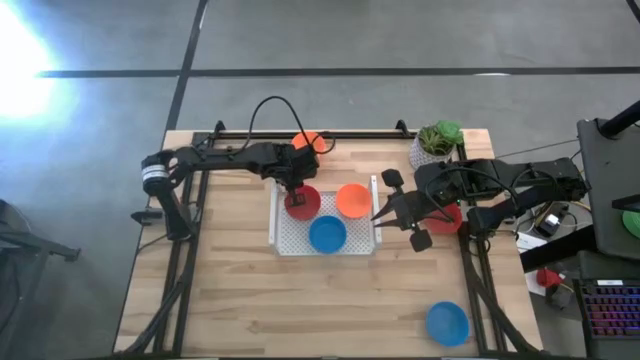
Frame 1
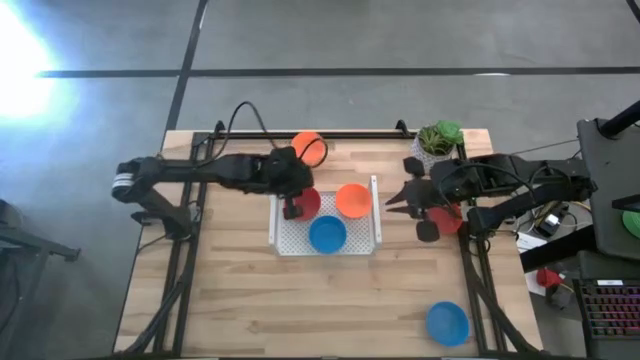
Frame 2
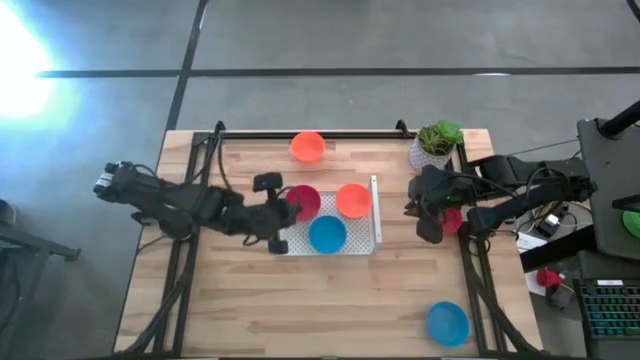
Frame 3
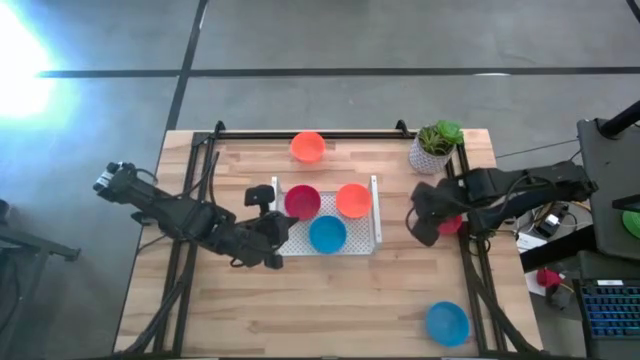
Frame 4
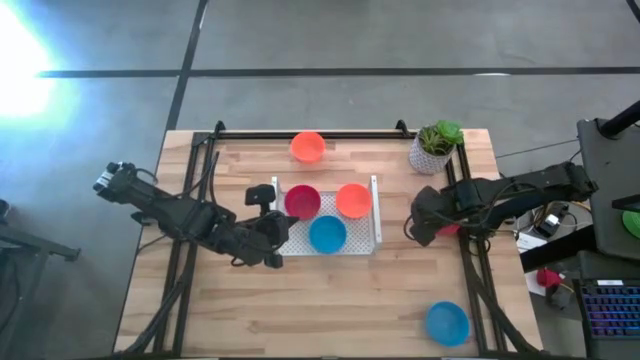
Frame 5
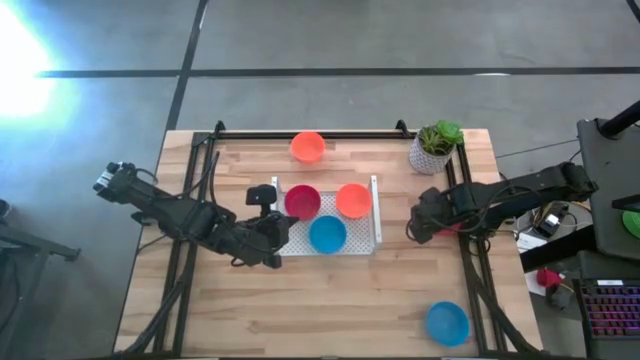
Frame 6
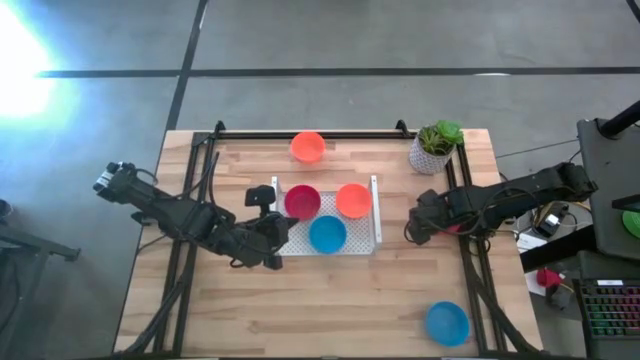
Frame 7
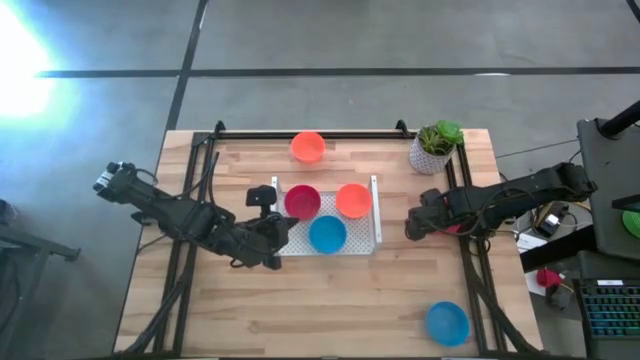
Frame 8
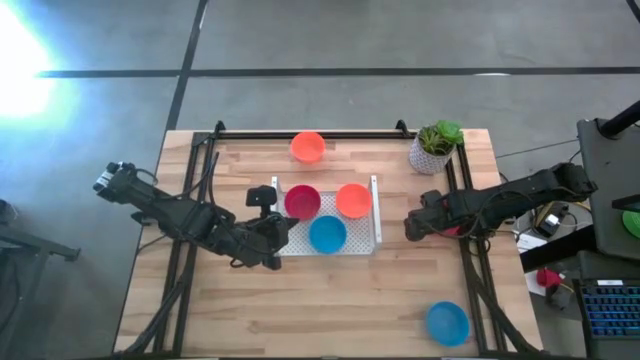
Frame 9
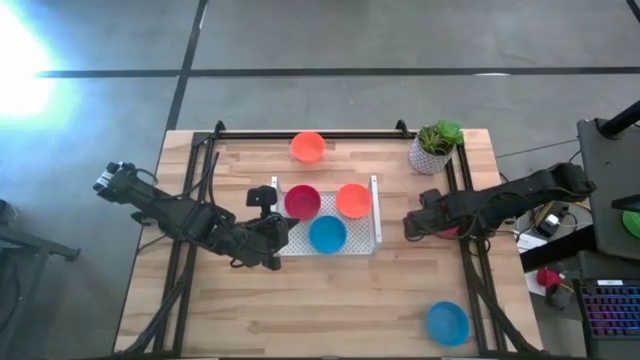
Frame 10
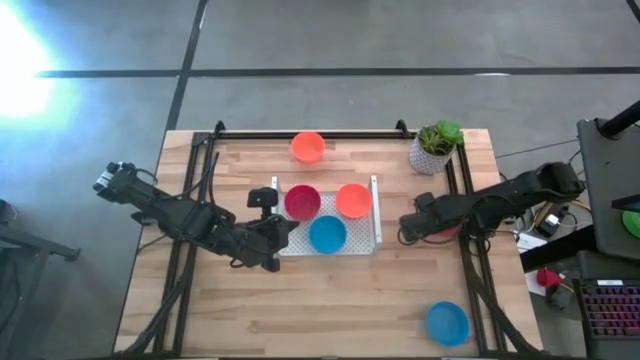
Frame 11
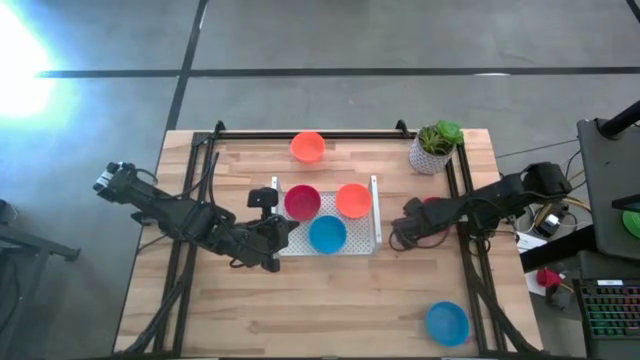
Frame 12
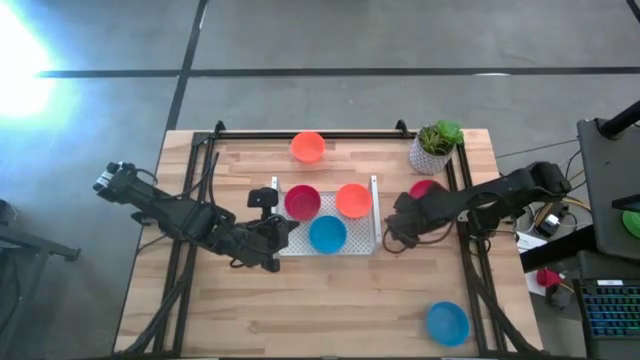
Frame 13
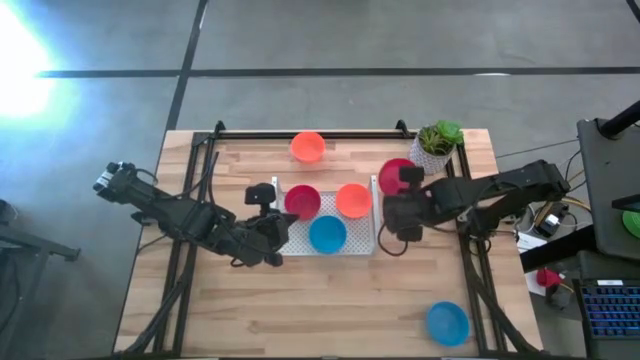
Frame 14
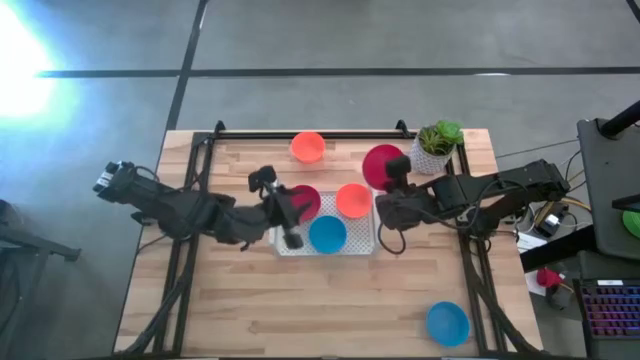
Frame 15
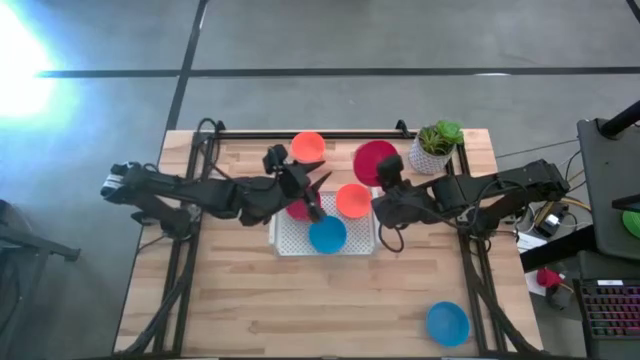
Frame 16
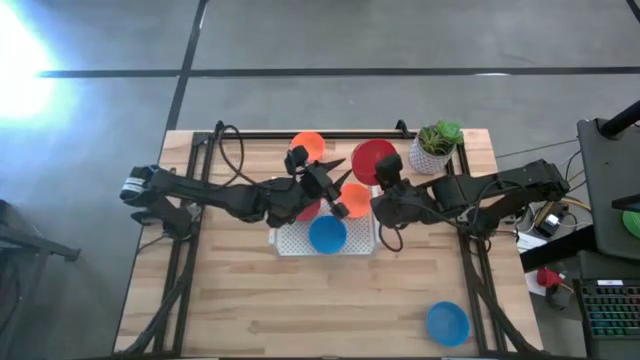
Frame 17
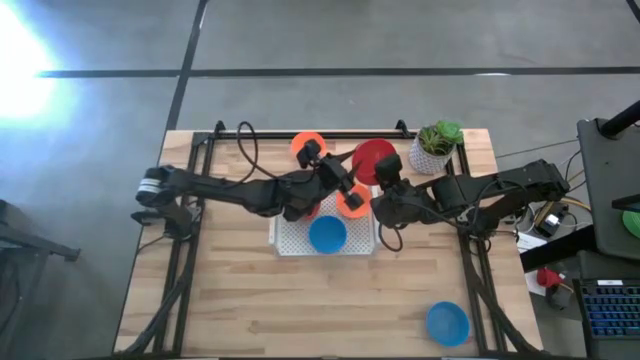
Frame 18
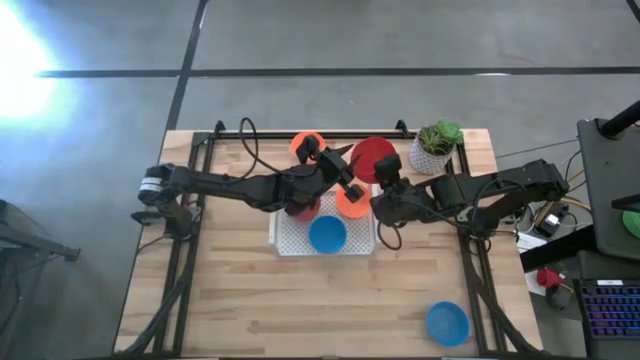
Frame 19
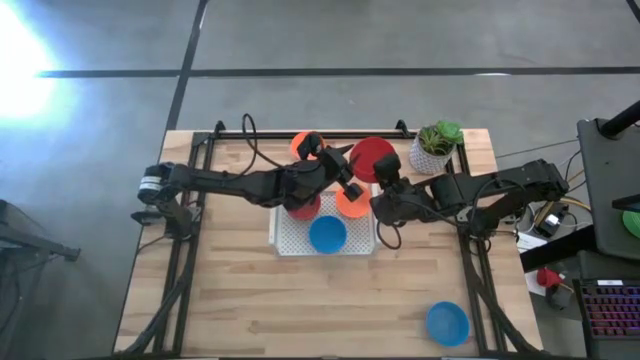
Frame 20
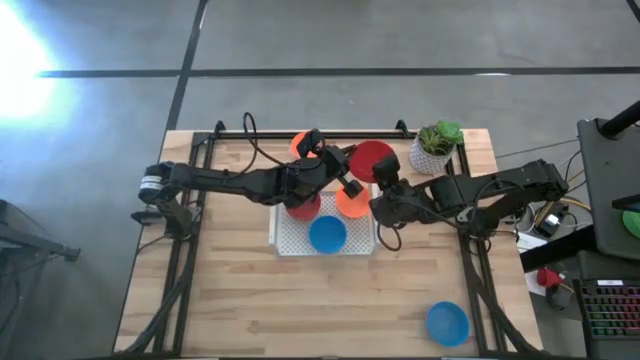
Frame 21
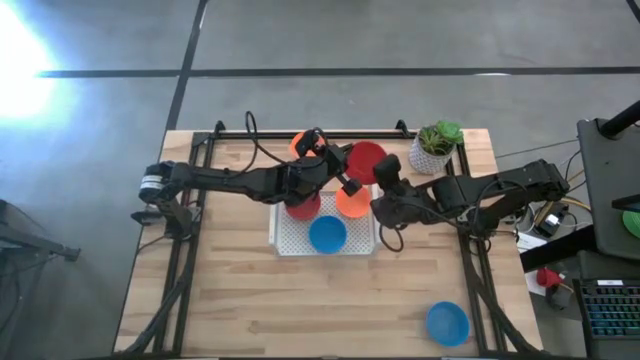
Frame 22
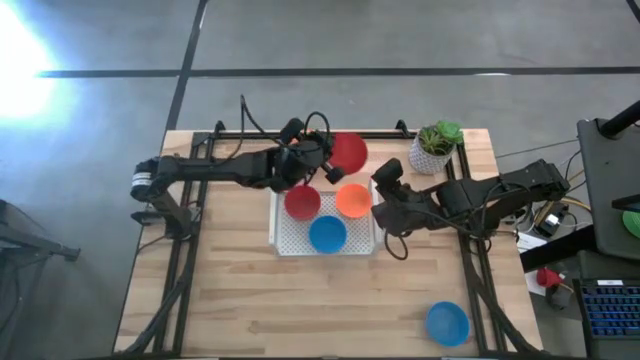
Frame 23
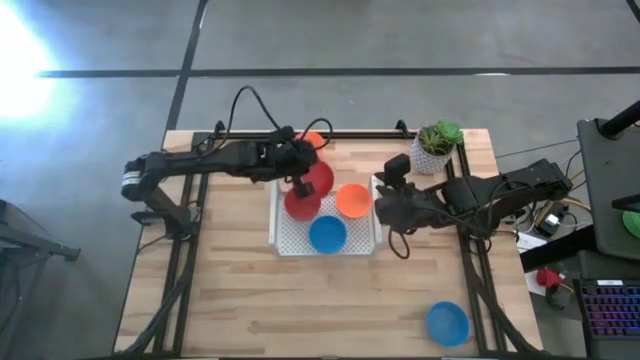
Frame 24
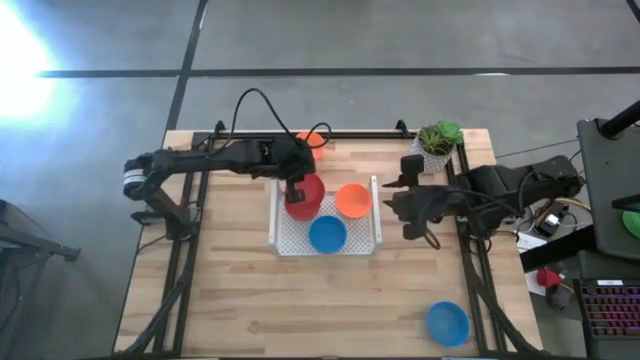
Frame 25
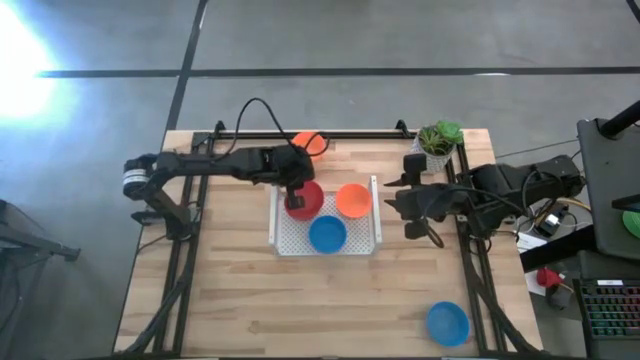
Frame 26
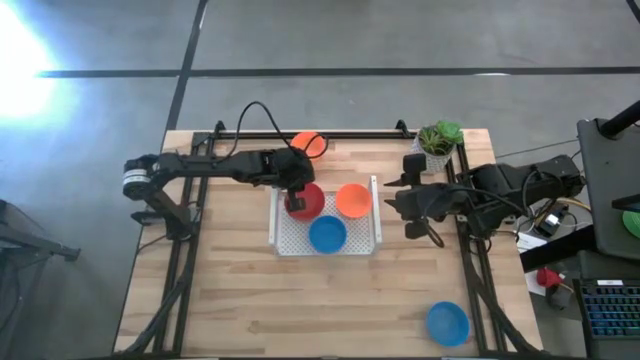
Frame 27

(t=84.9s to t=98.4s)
Task: Pick & Place Mini bowls
Stack the red bowl on top of the red bowls on the shelf

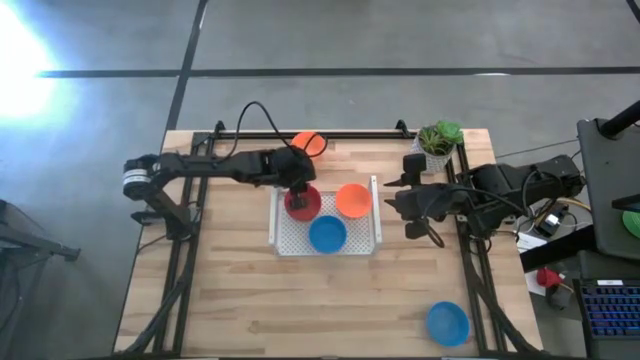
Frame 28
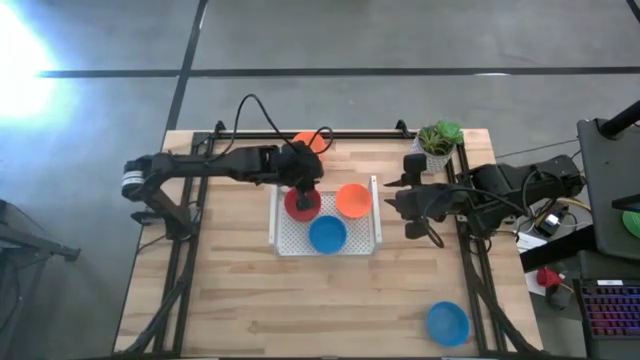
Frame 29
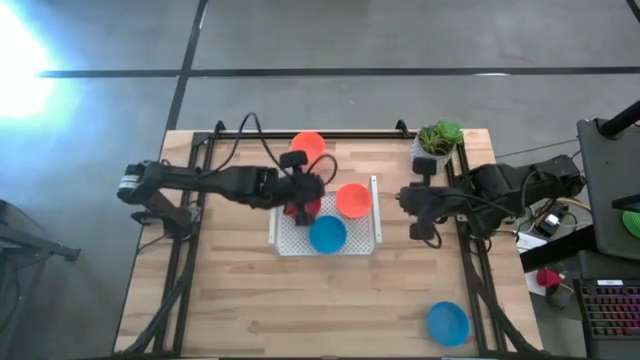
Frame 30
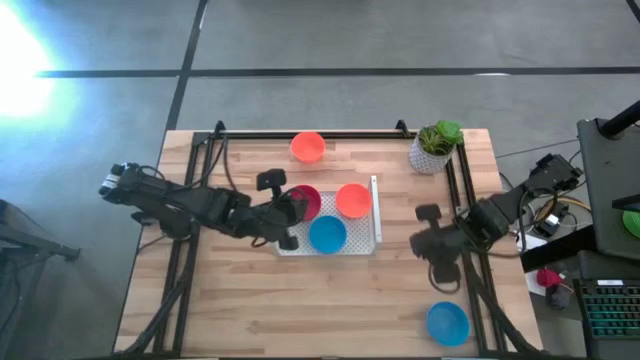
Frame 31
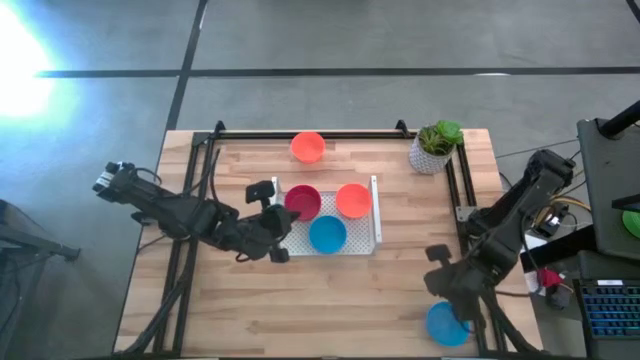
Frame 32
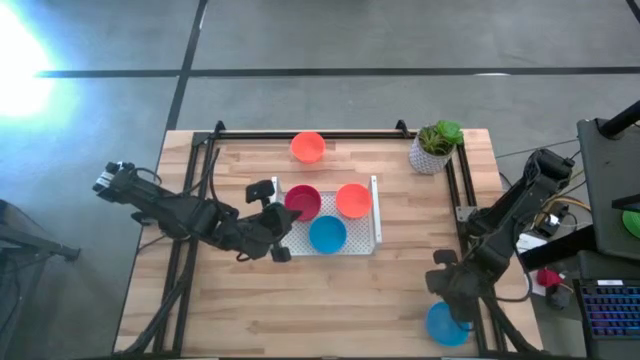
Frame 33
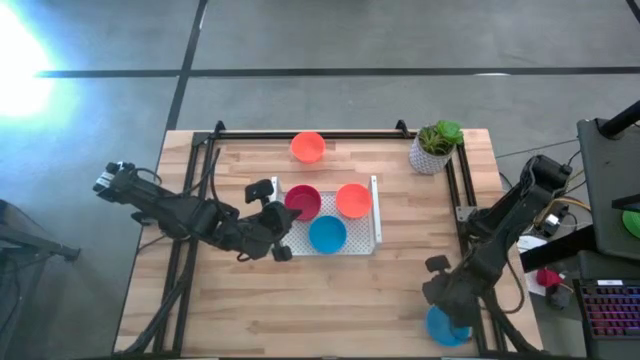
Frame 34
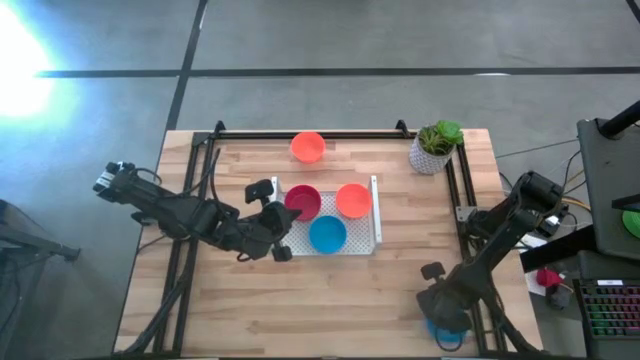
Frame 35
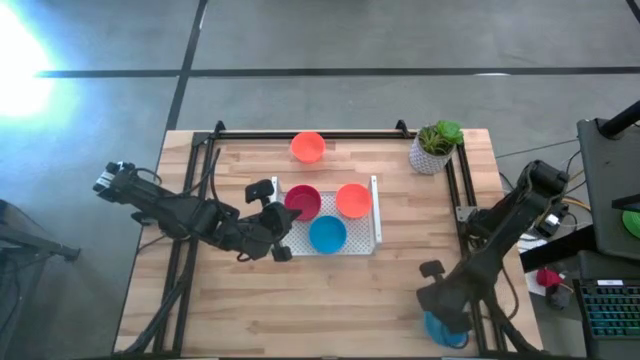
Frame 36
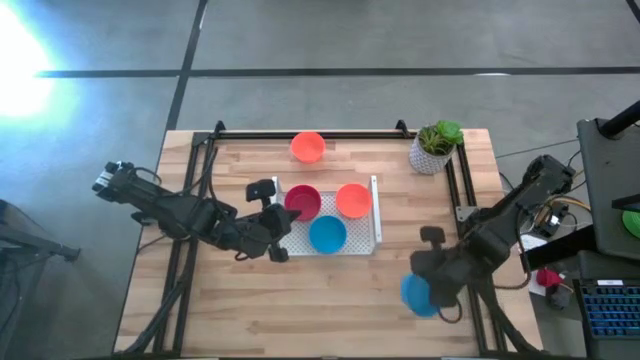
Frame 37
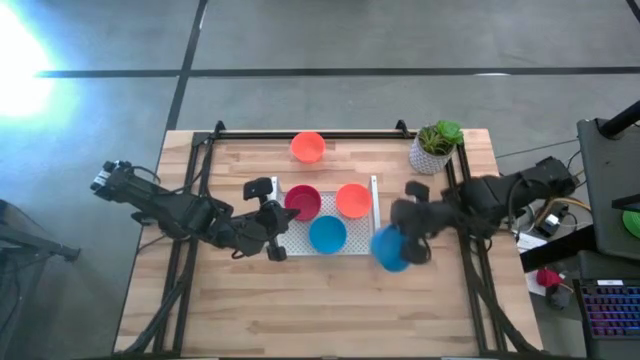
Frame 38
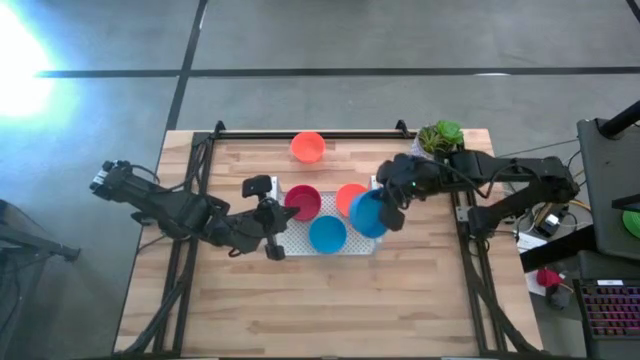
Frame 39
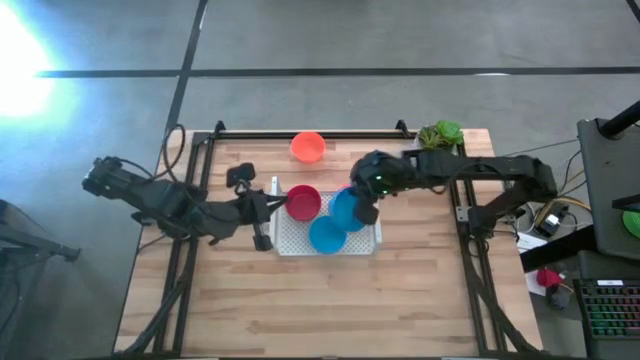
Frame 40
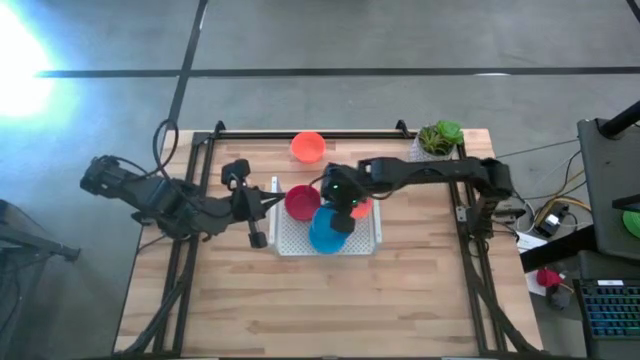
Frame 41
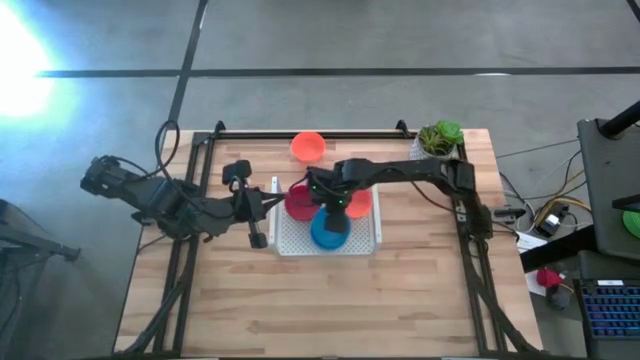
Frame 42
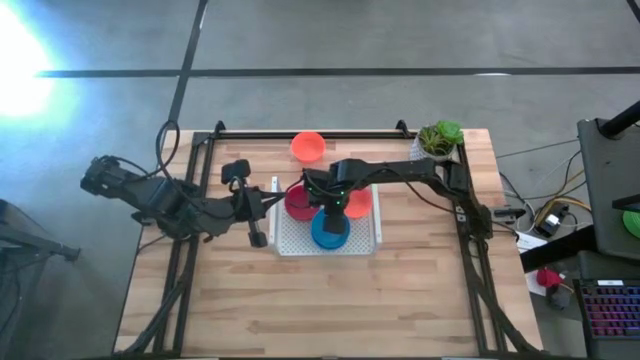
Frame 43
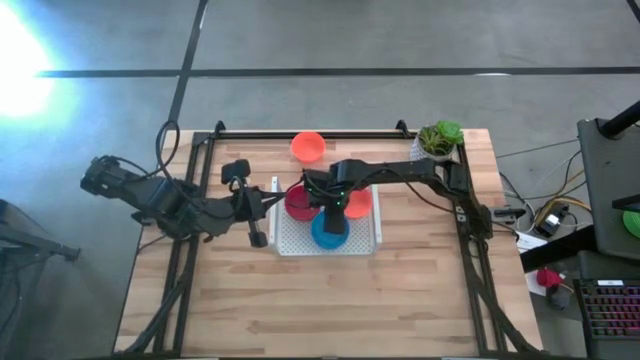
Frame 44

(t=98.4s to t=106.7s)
Stack the blue bowl on top of the blue bowls on the shelf
